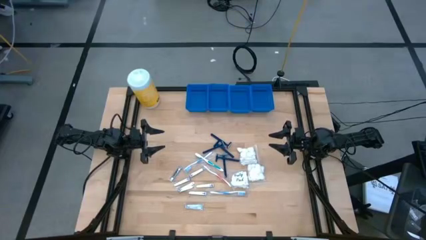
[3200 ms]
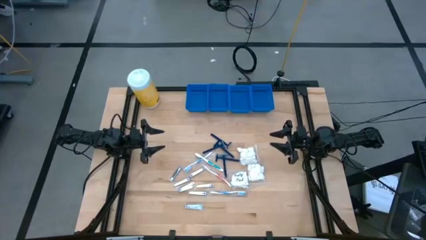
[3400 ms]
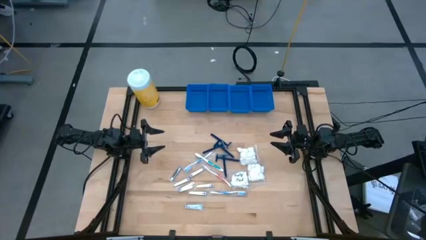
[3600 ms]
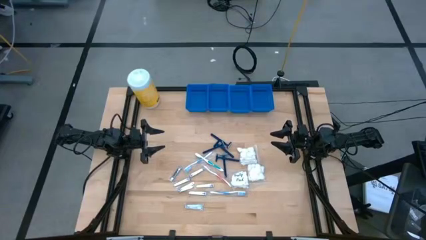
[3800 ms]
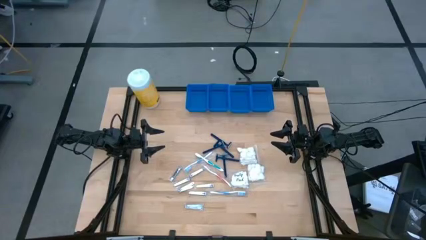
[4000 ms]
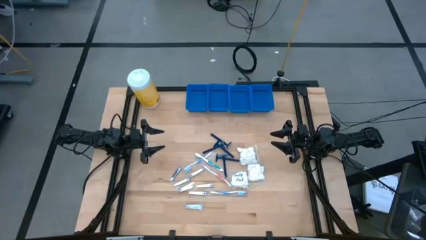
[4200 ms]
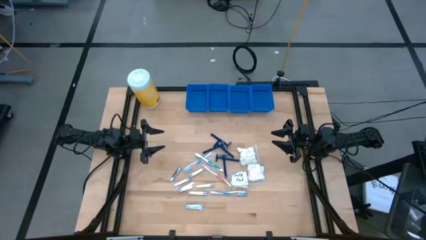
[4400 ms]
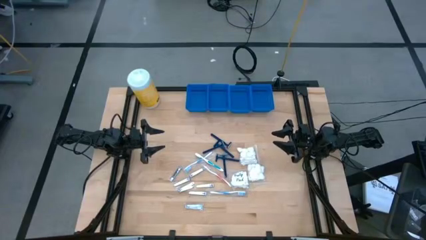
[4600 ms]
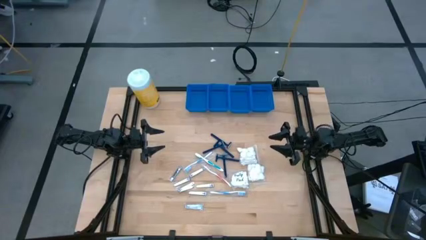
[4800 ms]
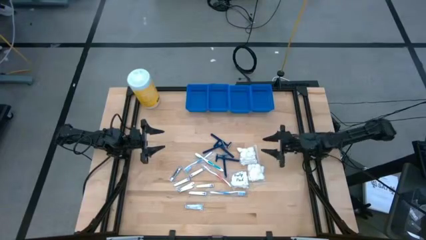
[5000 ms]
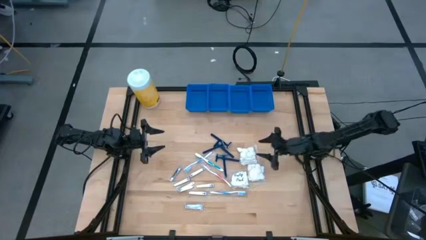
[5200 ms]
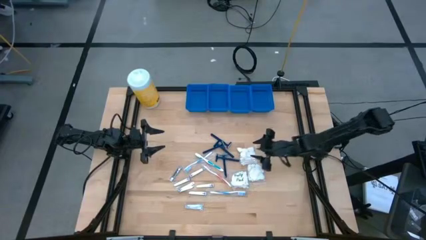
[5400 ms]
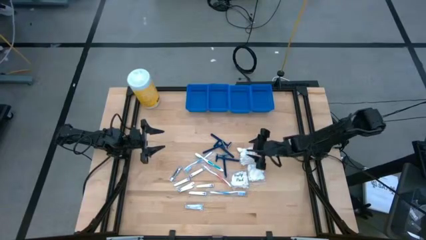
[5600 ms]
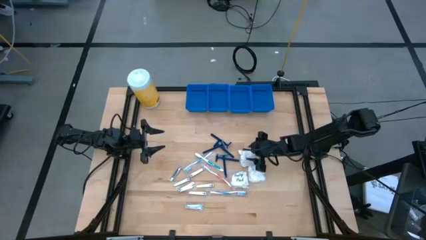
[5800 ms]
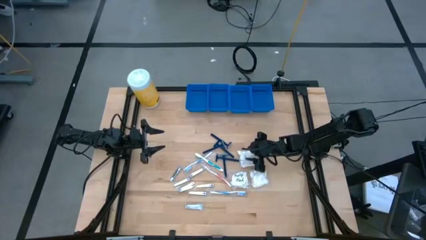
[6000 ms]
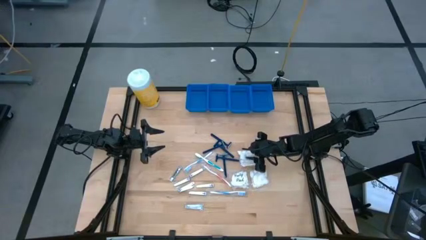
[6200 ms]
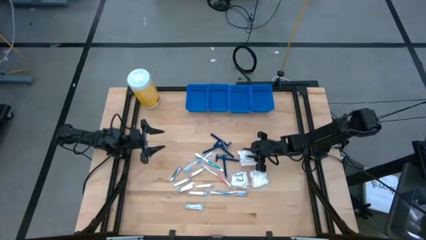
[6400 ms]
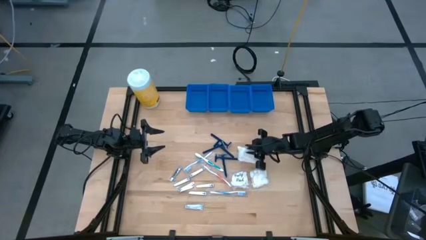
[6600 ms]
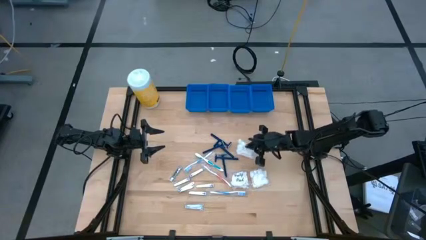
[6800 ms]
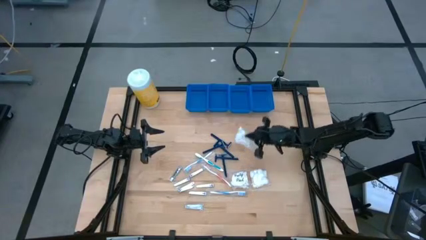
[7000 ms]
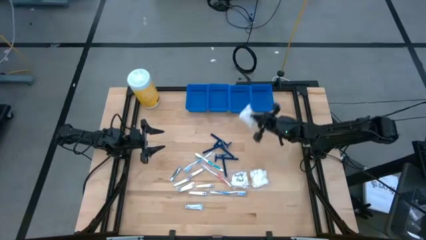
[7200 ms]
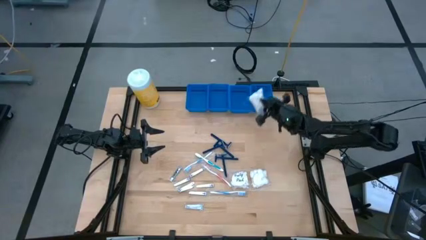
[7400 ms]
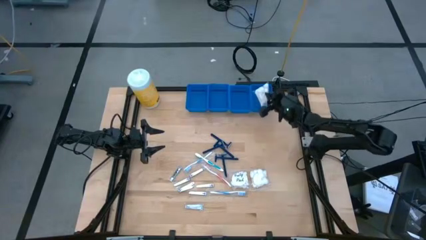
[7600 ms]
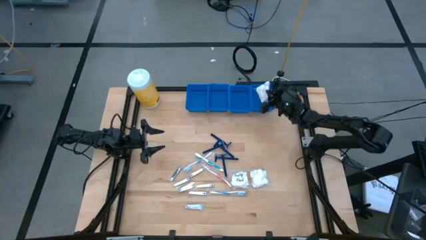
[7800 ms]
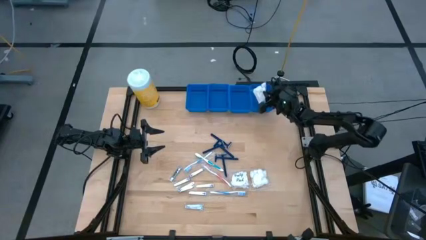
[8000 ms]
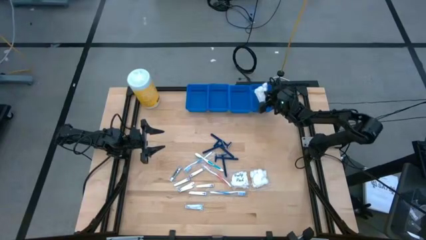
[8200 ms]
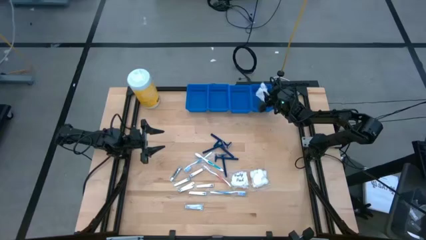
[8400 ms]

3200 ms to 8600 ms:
Task: Pick & Place Travel size toiletries
Put the white cotton pack into the right blue basket

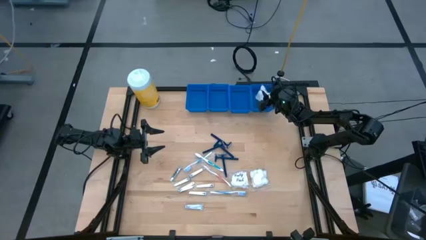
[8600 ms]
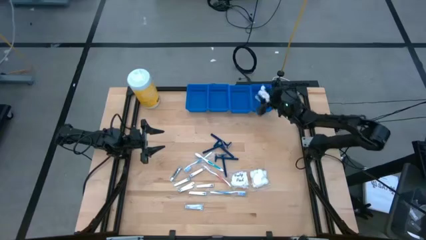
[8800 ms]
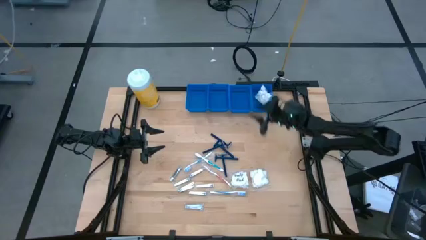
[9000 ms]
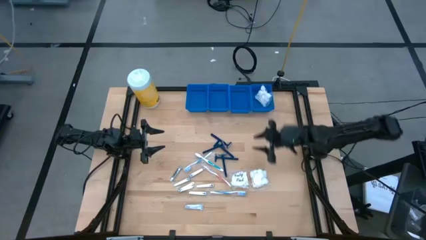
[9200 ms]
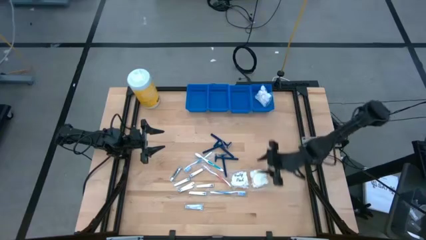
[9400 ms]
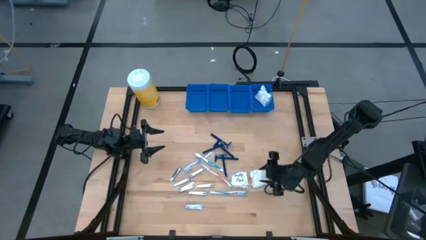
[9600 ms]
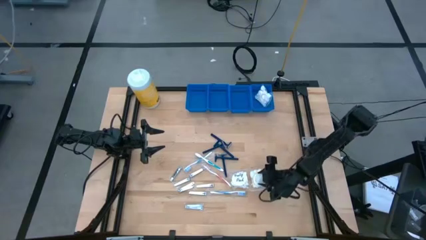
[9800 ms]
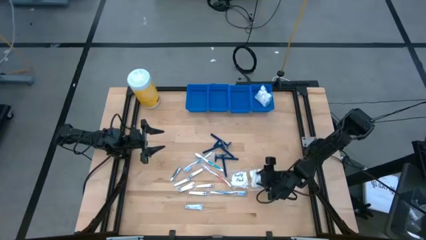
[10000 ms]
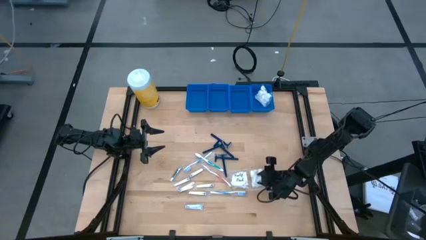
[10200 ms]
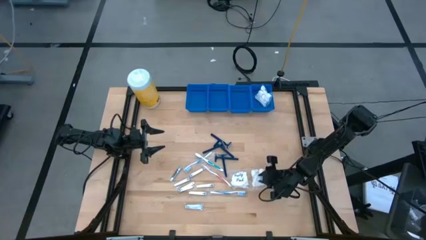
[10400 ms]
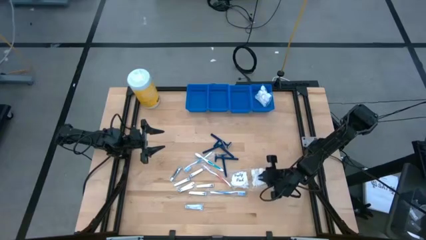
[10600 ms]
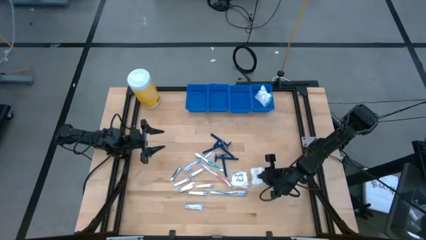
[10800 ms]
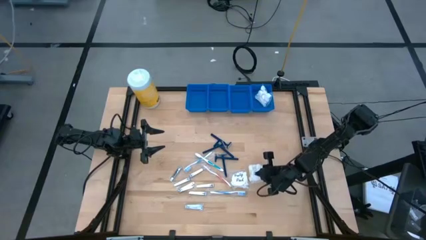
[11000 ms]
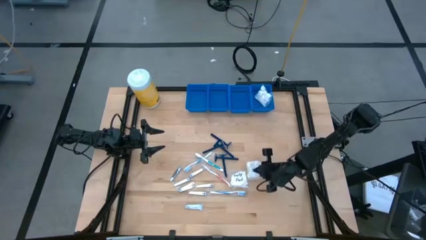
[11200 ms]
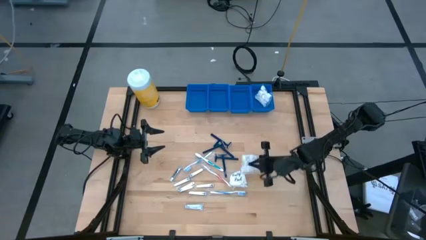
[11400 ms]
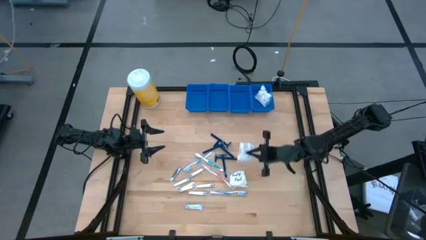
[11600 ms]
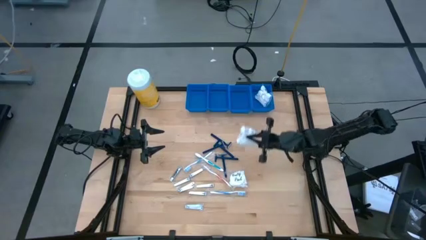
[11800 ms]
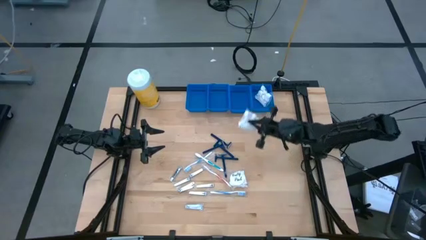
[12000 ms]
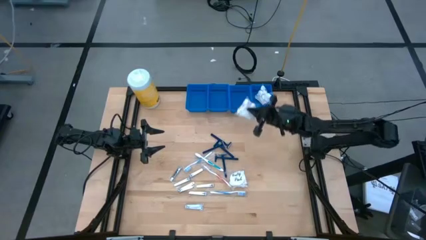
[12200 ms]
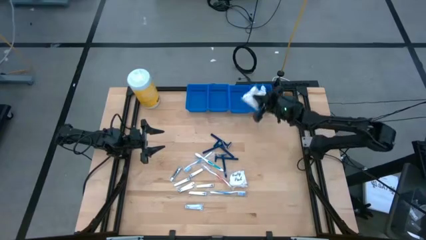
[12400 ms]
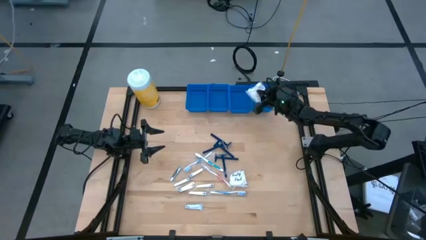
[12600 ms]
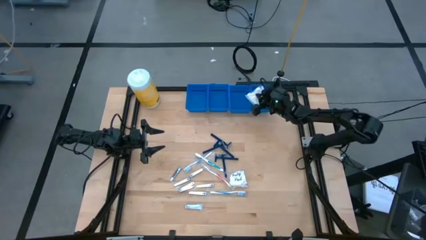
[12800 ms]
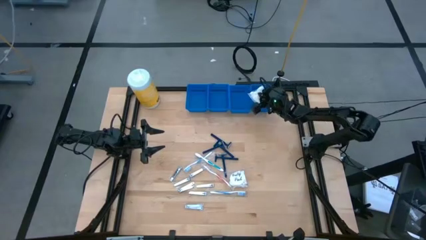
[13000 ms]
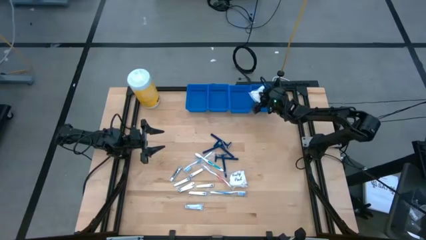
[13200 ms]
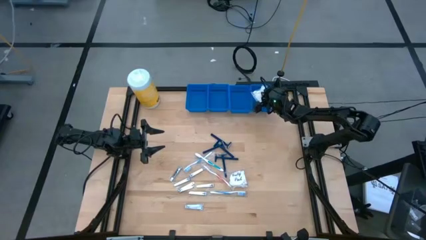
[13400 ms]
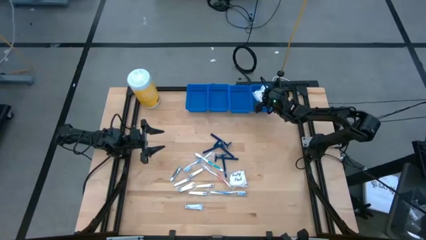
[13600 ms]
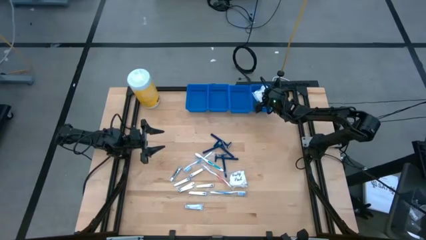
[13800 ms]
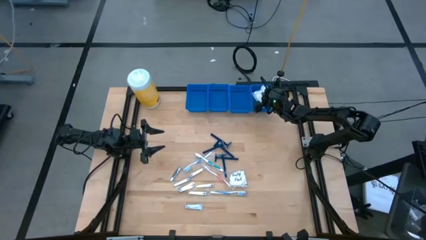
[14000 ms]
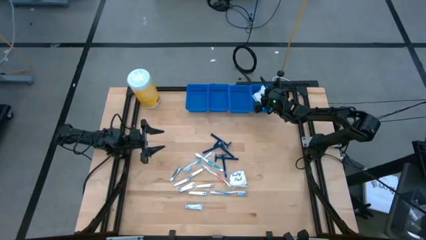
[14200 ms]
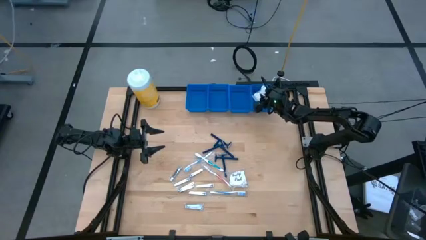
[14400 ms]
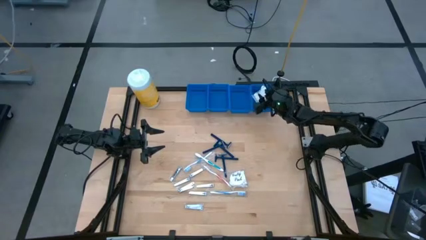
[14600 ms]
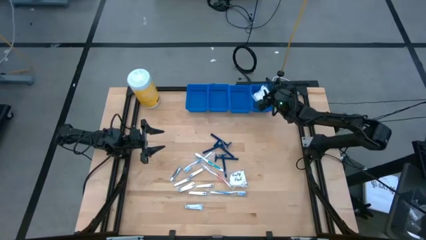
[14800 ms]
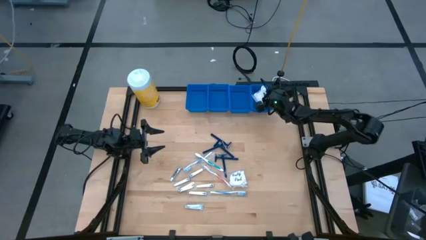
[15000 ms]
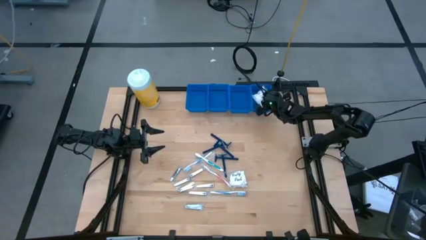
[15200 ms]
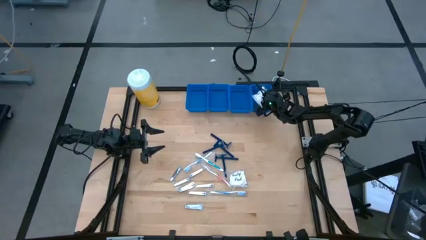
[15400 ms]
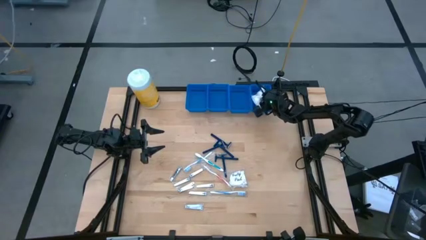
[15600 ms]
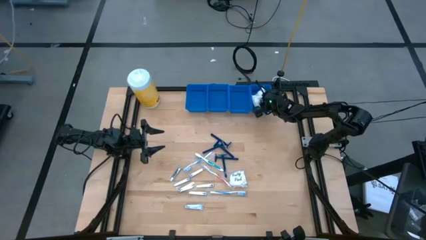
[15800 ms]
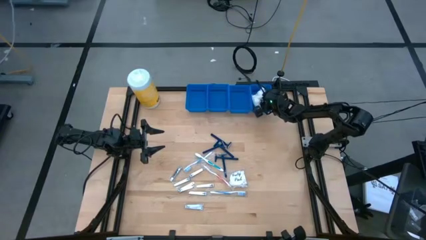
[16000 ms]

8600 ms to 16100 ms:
Put the white cotton pack into the right blue basket

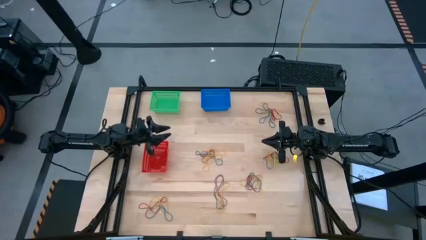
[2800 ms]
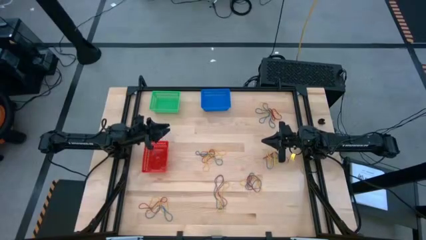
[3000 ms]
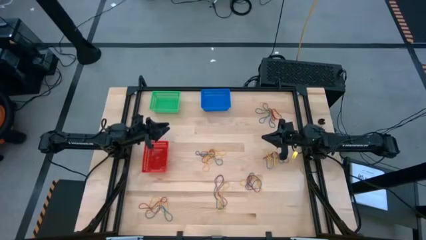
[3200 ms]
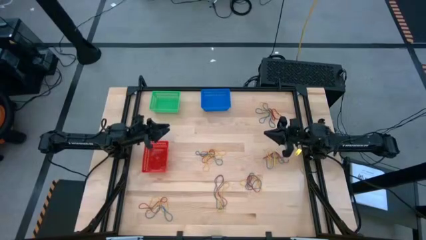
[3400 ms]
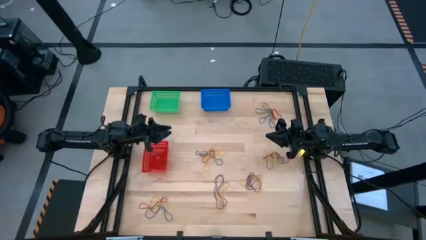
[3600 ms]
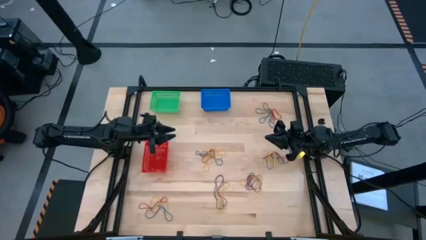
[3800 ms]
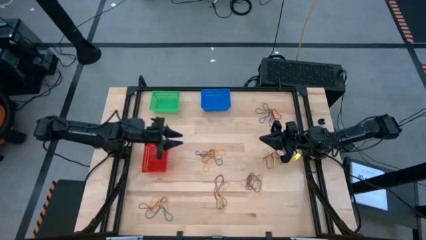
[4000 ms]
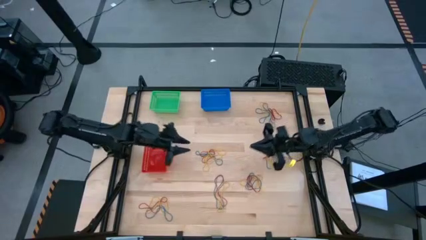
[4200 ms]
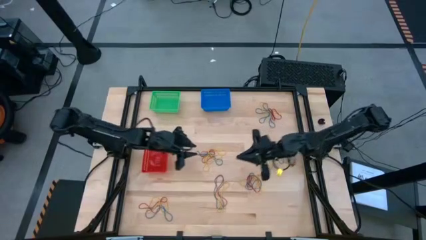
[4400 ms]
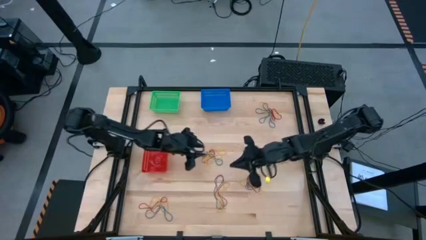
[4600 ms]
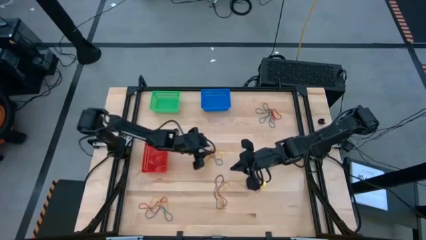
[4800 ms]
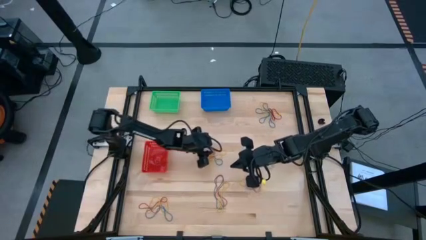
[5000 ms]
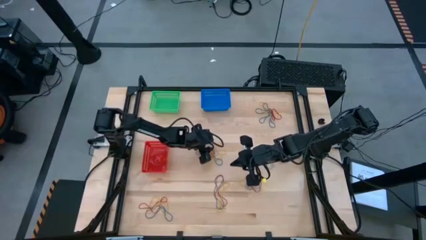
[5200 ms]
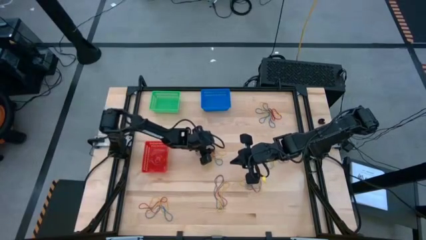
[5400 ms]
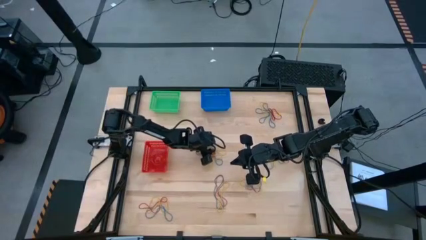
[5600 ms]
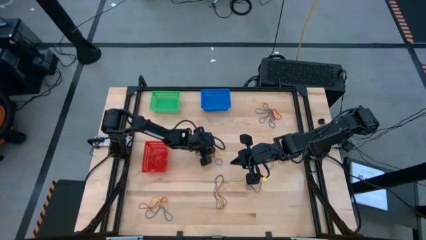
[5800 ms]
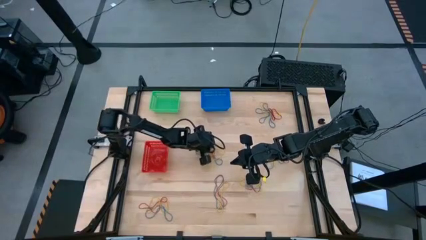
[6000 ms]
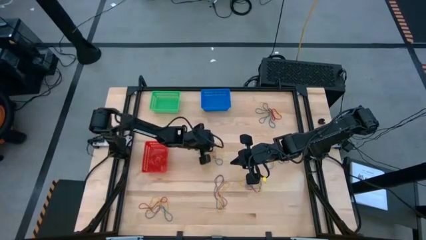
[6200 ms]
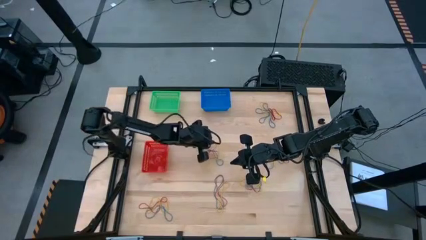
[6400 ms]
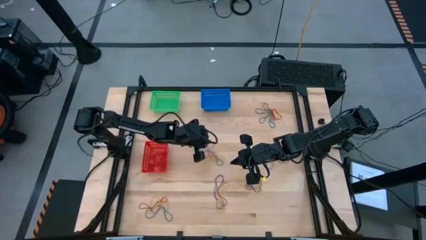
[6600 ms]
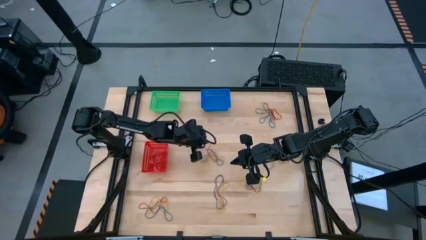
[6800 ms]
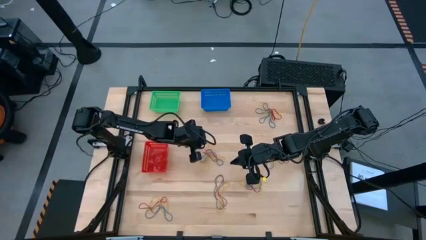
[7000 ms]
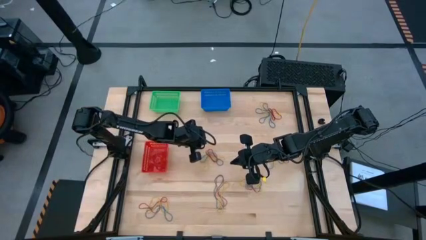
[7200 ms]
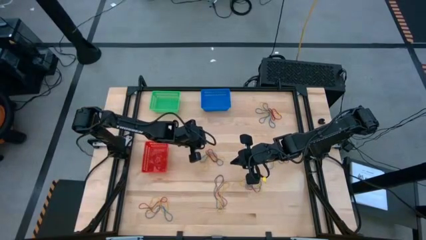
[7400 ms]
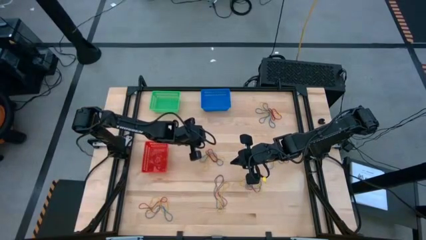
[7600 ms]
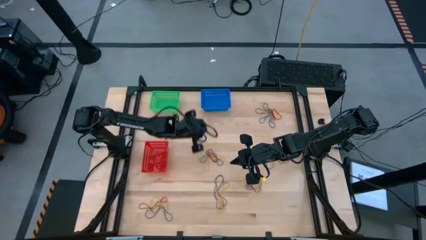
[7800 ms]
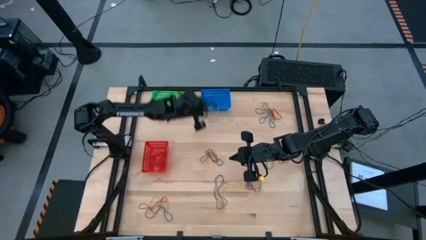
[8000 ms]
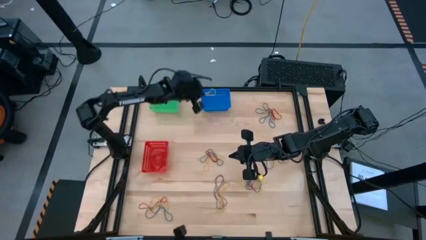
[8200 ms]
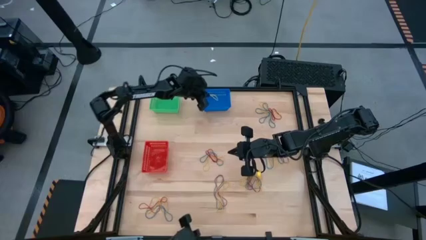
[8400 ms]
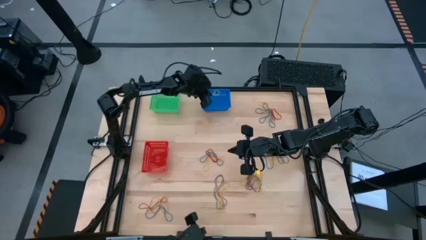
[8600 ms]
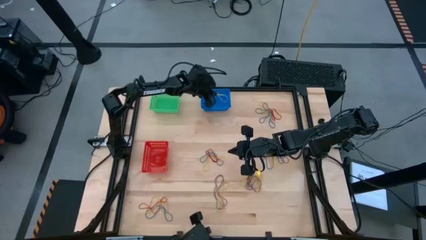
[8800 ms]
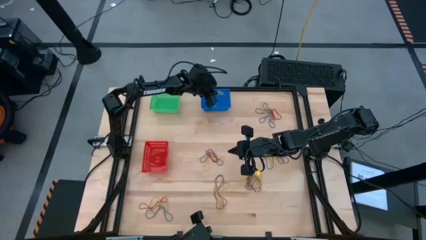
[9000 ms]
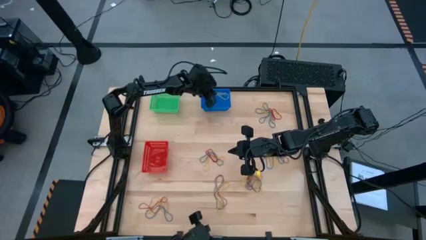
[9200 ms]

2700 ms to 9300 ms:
Task: Sort rubber bands into baskets
Put the yellow rubber band into the blue bin
